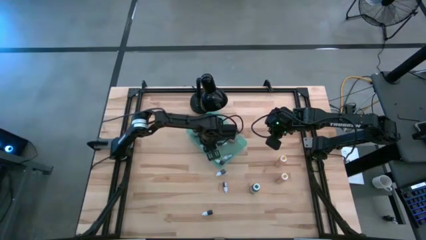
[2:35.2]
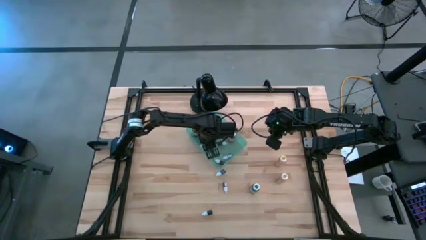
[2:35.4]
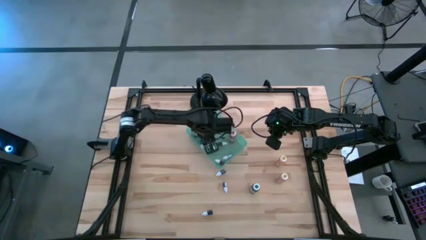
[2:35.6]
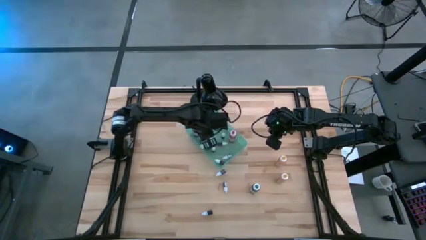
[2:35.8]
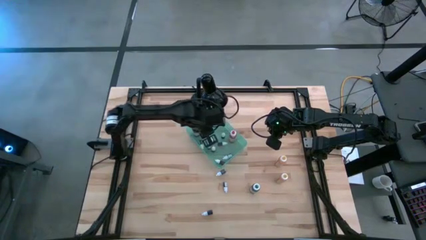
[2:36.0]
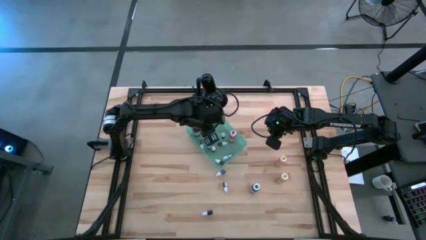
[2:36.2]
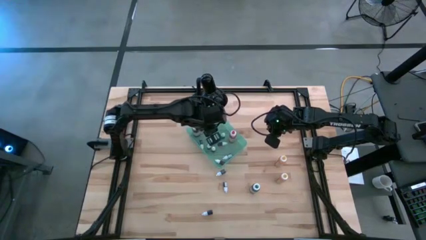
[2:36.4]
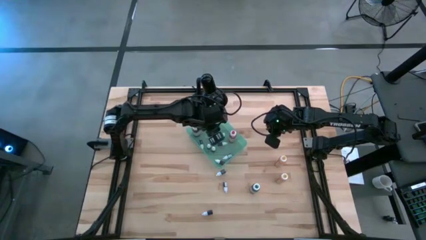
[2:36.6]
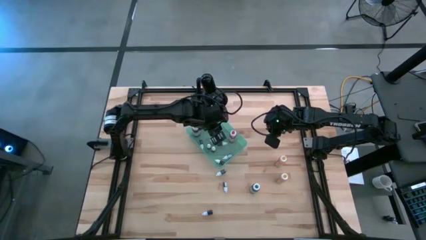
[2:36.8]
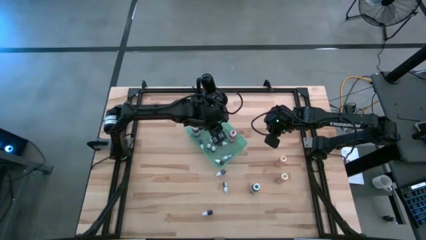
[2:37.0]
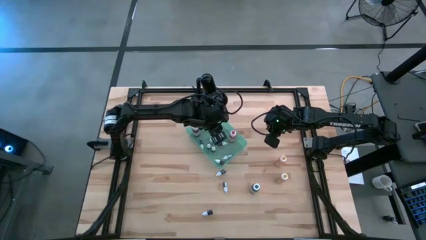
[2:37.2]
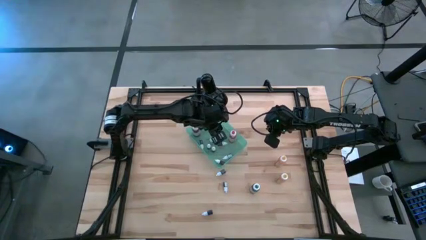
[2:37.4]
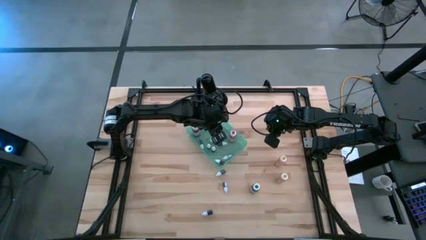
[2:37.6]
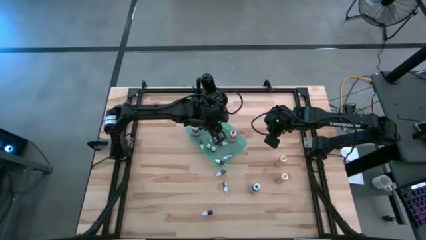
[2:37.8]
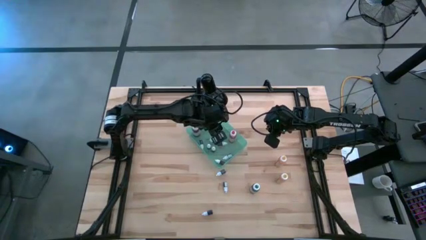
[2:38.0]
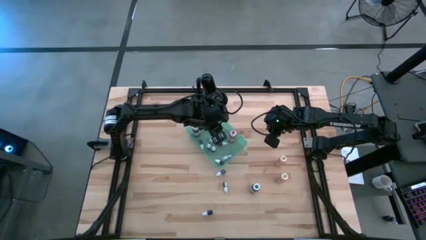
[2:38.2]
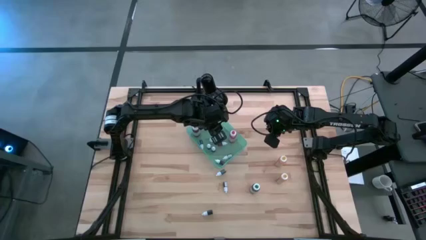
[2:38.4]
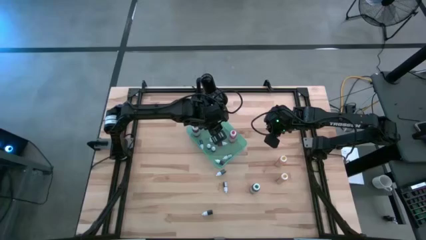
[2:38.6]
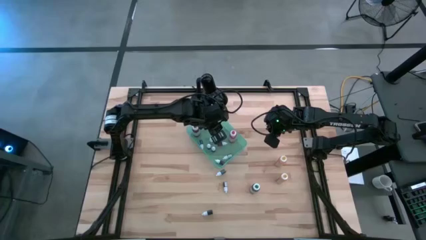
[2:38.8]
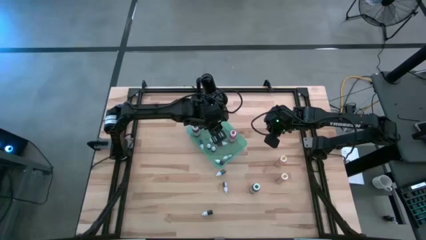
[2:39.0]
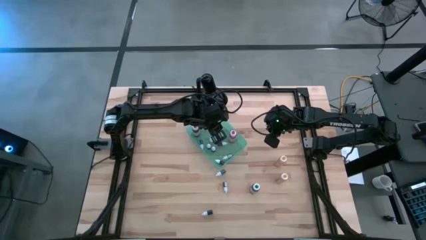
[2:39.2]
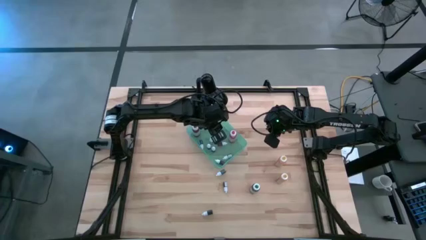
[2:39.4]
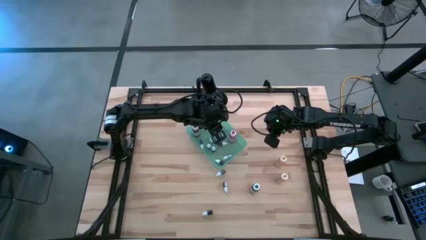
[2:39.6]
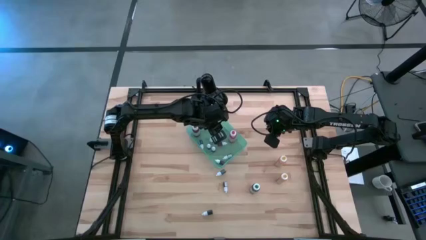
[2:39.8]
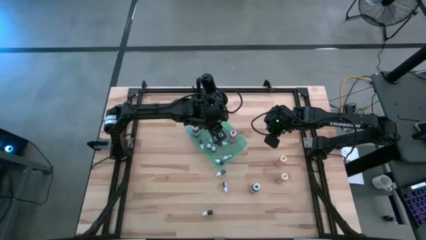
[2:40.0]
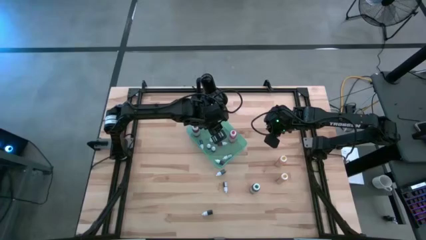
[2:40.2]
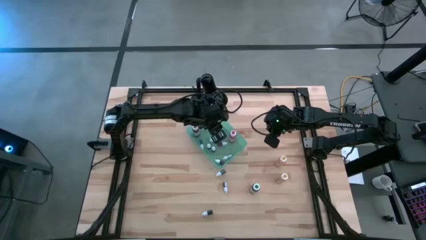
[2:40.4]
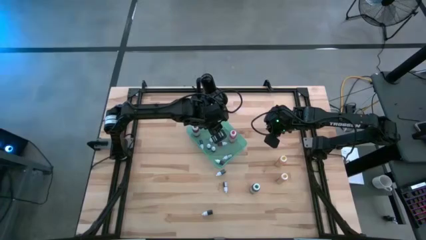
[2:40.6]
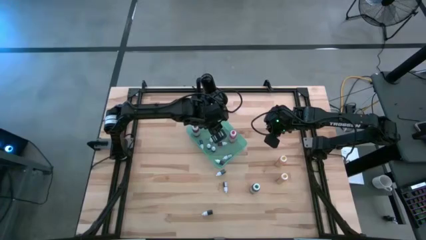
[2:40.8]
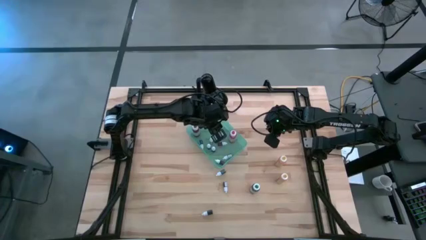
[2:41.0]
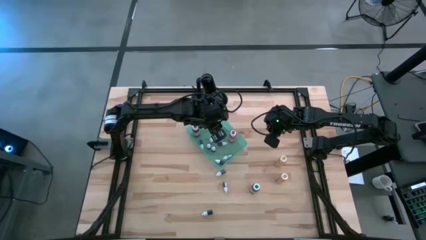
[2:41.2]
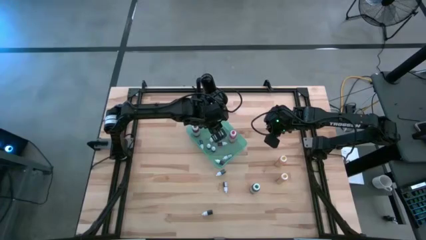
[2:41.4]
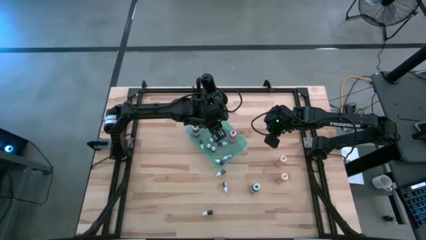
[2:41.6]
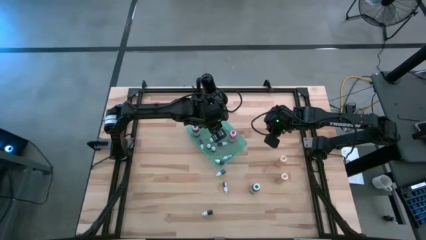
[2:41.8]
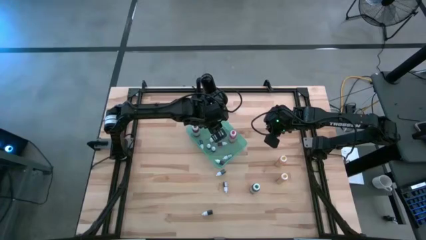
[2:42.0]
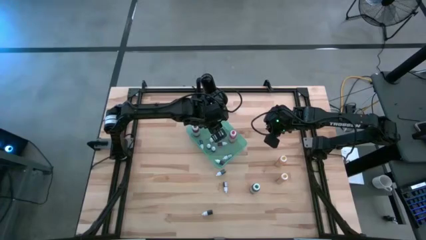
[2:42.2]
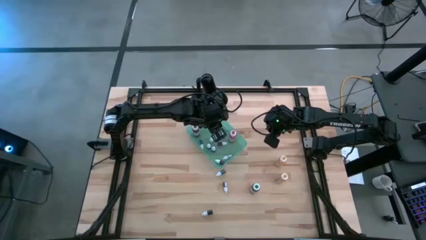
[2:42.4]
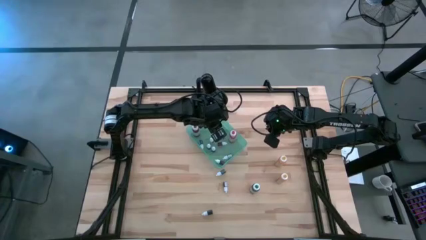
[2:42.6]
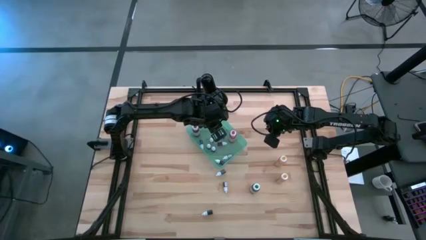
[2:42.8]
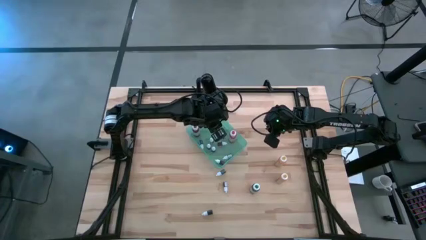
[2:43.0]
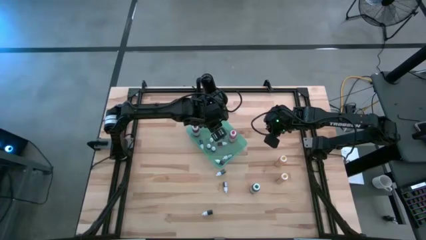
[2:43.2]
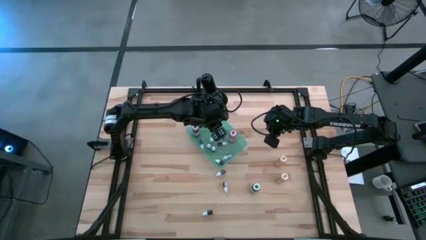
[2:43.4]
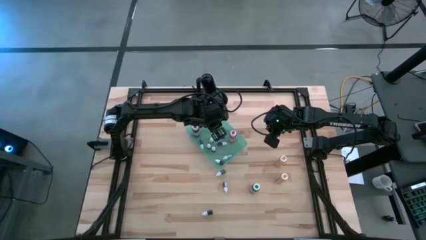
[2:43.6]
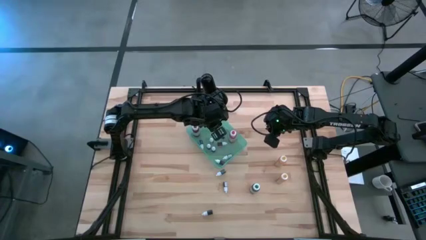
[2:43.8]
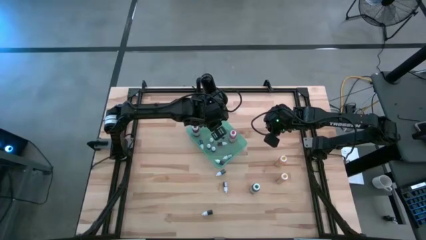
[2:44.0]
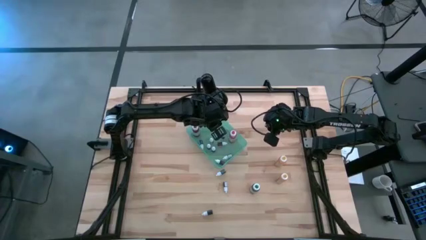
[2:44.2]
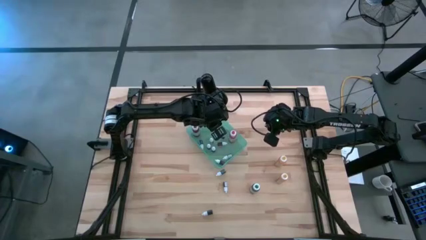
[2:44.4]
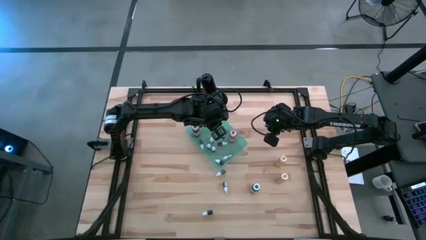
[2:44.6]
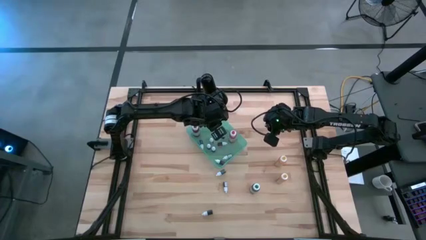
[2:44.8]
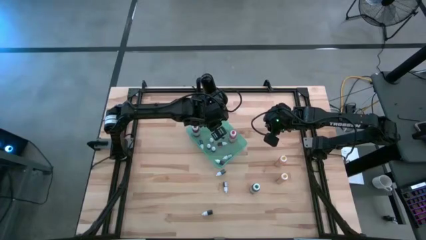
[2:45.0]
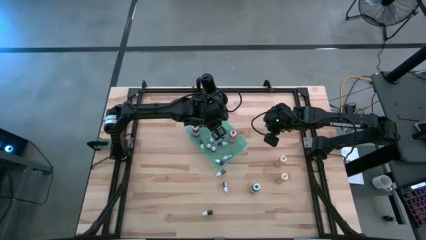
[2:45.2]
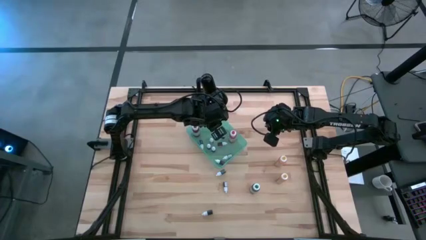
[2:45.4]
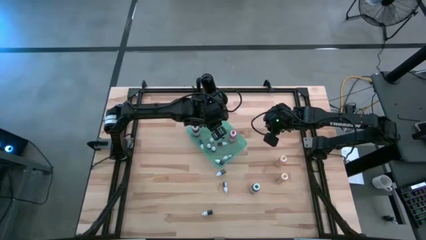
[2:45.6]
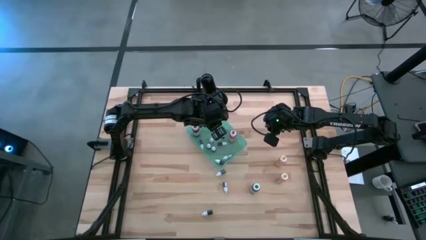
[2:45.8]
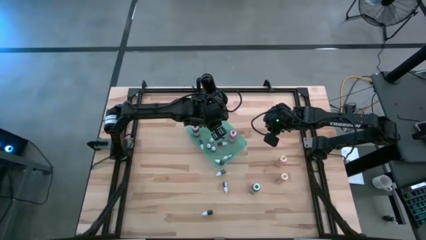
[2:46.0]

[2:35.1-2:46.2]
Task: Pick & Place food coloring
Put the small black food coloring bottle into the green bin

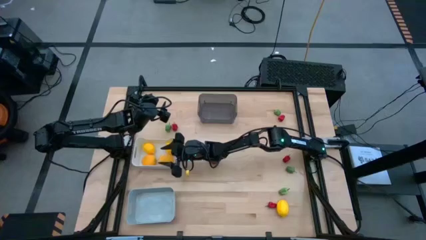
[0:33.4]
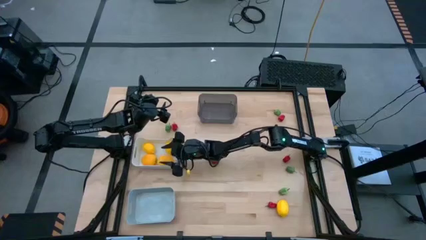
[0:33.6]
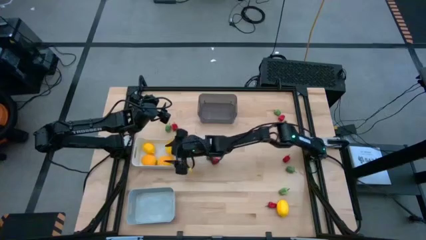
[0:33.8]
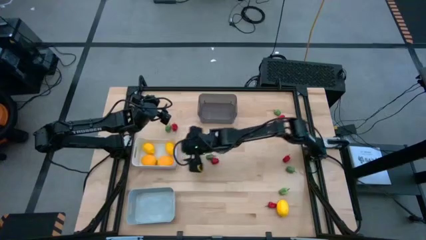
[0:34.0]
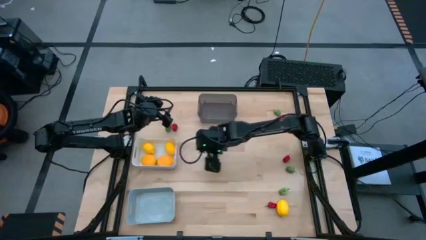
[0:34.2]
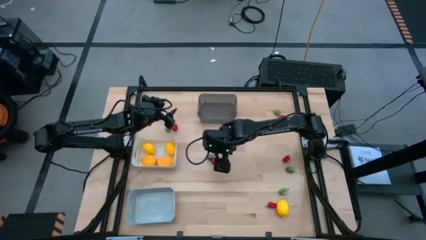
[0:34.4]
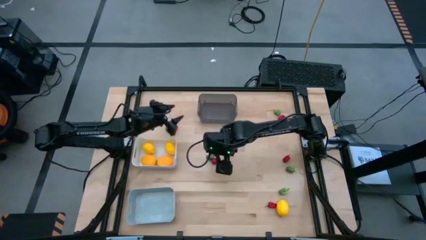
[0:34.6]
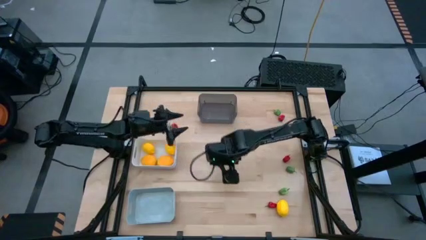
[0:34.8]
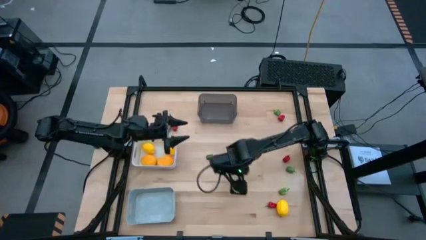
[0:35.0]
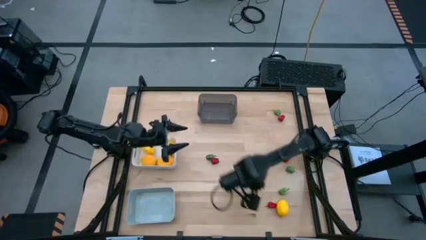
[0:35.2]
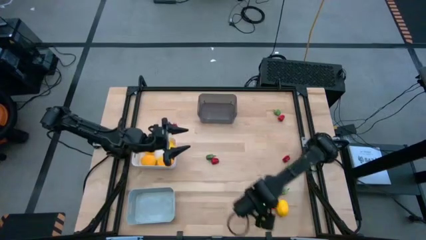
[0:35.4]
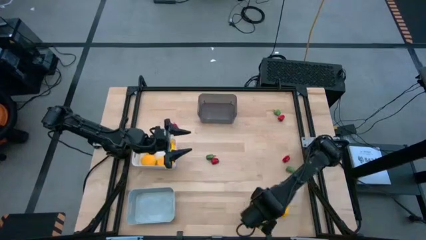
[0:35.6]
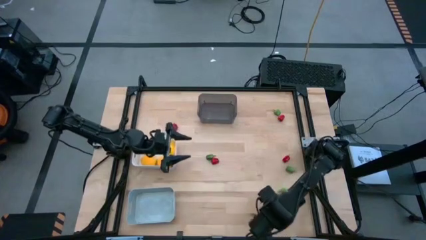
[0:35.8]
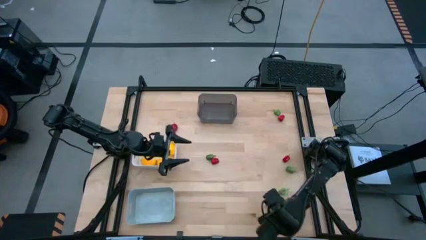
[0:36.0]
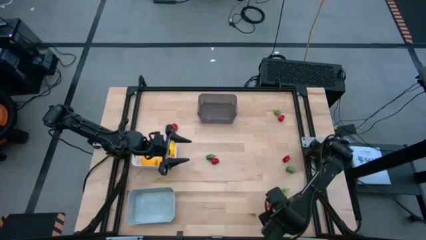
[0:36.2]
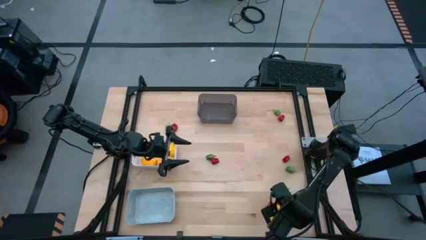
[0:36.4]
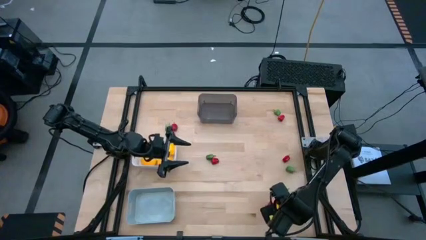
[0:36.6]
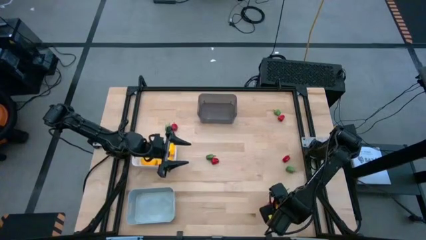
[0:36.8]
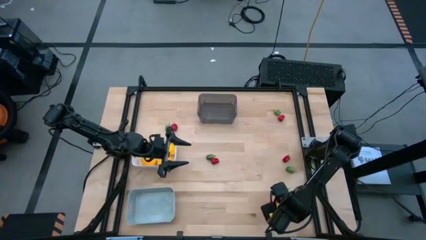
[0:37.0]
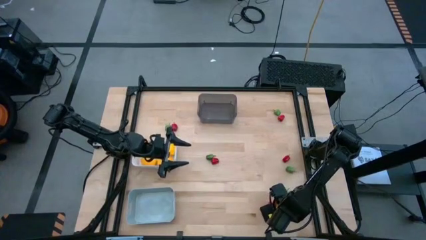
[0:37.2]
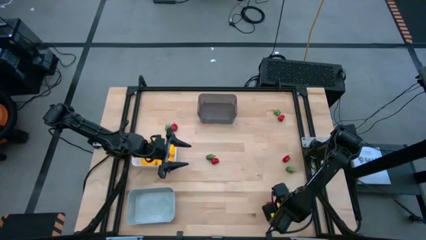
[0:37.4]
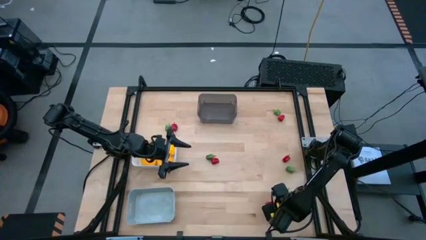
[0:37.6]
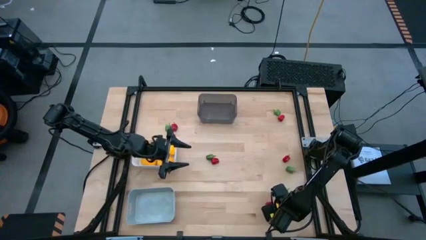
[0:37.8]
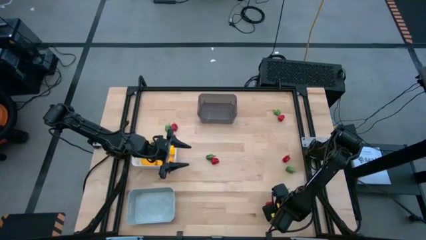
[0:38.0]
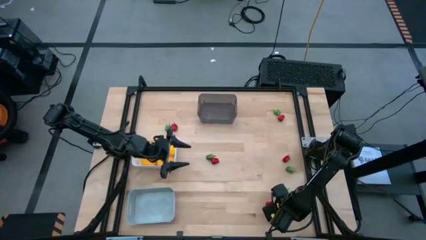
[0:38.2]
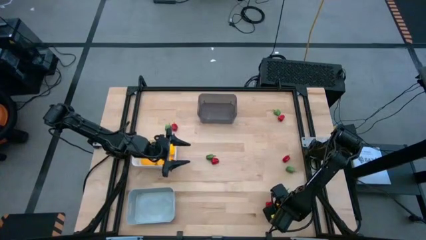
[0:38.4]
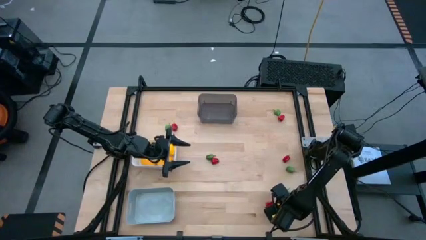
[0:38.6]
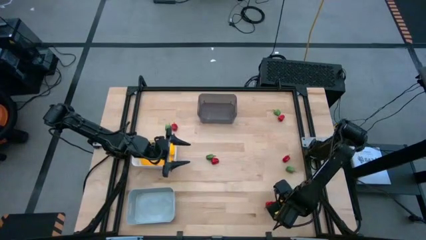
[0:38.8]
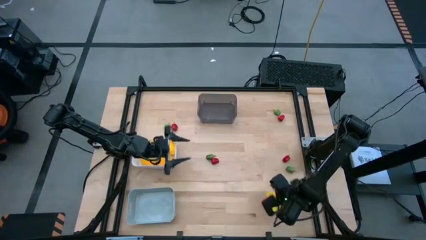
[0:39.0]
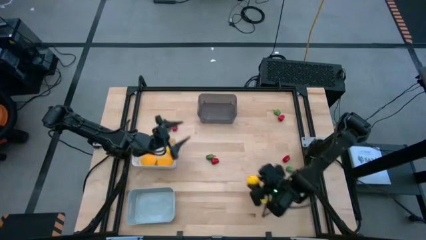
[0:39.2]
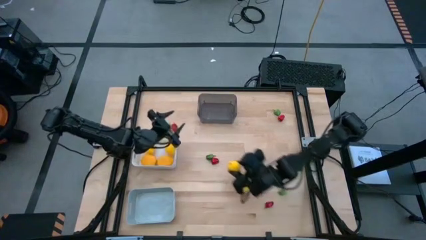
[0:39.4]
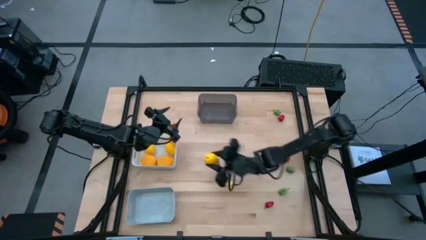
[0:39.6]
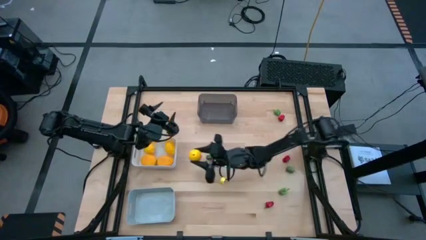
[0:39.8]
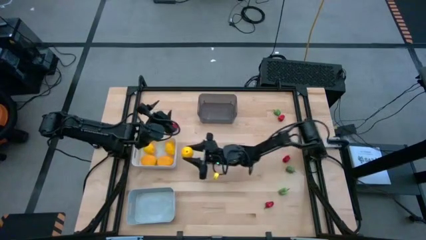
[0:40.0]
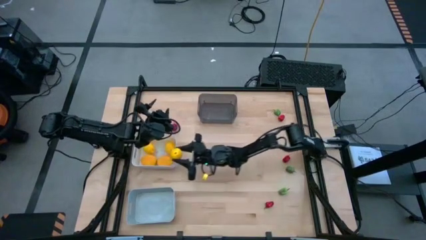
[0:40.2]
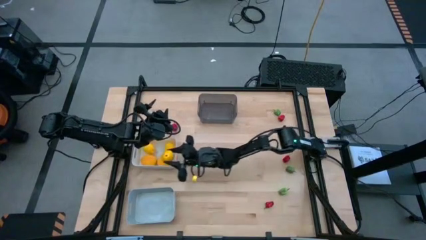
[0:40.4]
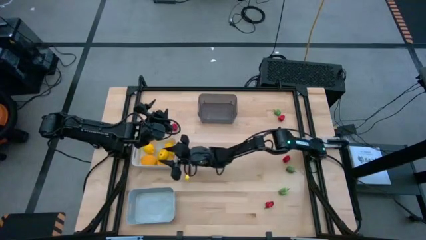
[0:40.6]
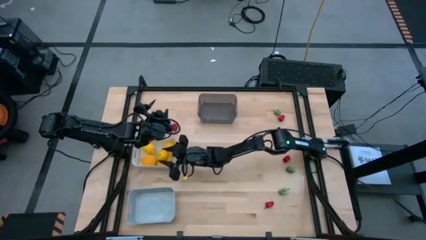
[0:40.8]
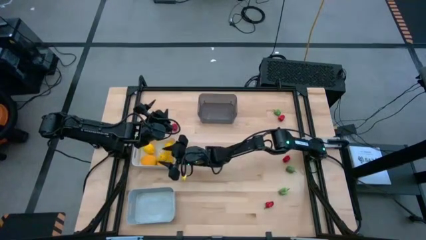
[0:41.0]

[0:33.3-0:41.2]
Task: Sort produce into baskets
Put the lemon into the white bin
